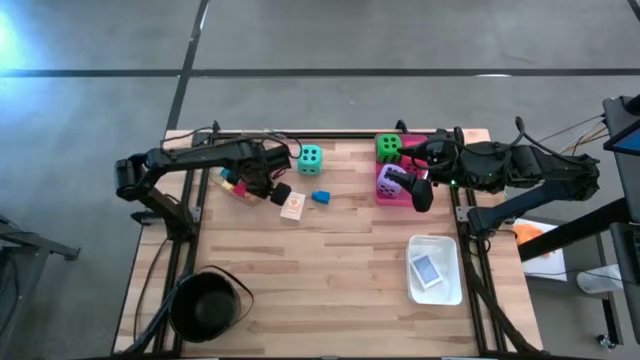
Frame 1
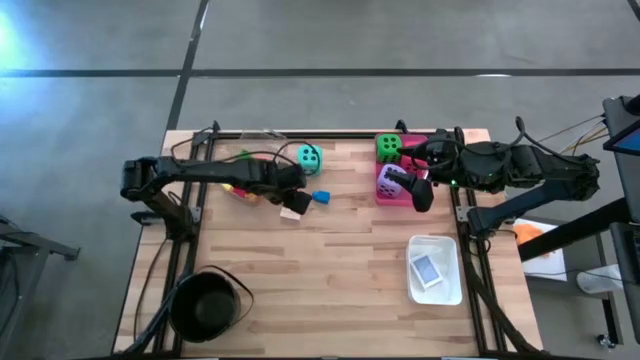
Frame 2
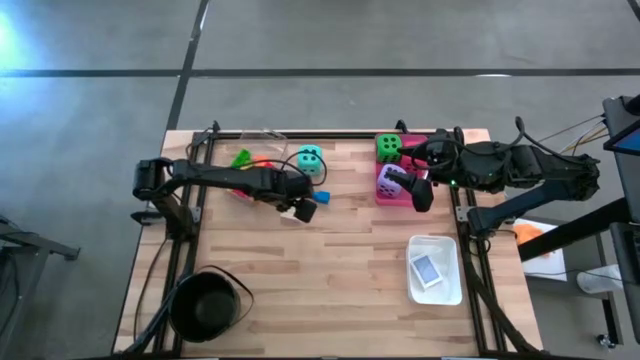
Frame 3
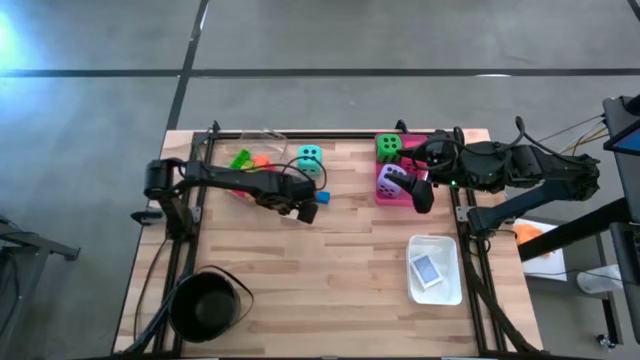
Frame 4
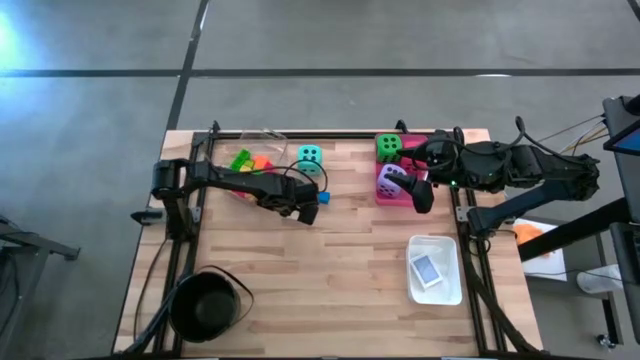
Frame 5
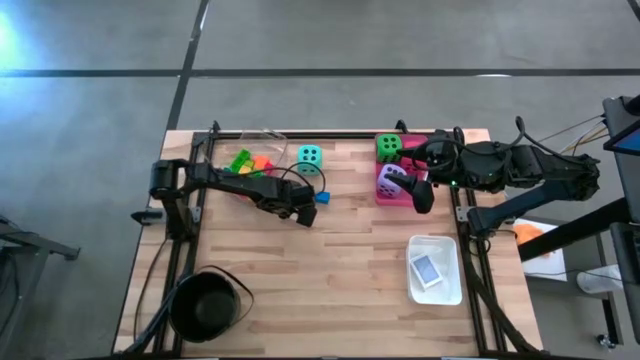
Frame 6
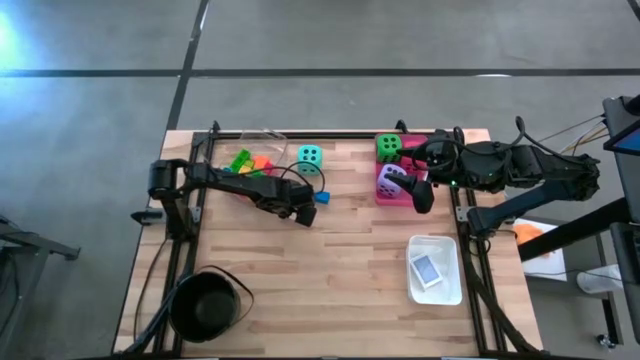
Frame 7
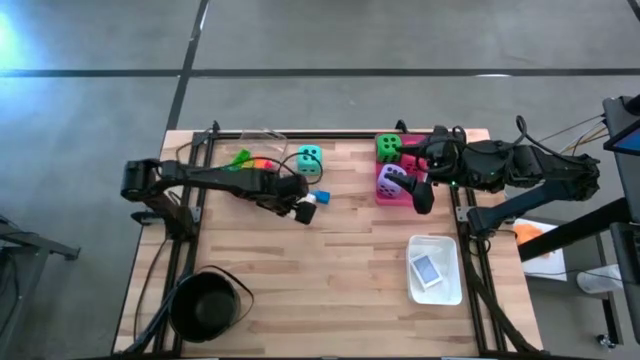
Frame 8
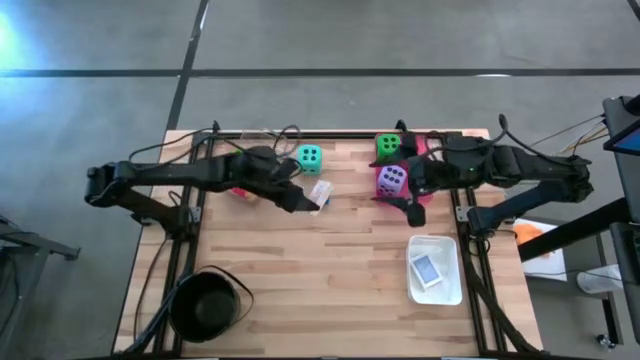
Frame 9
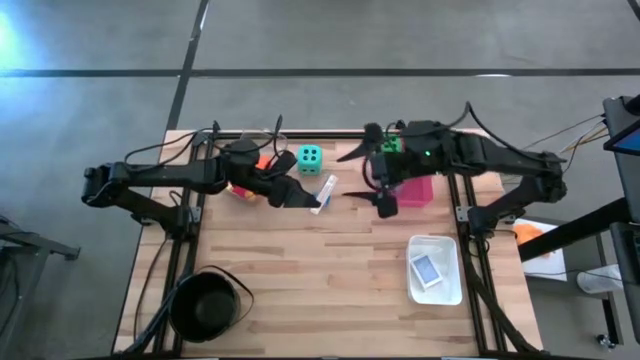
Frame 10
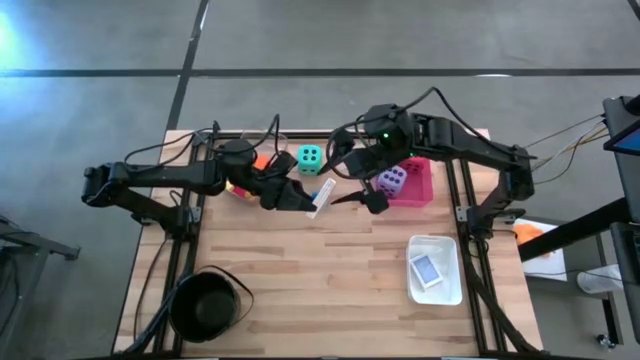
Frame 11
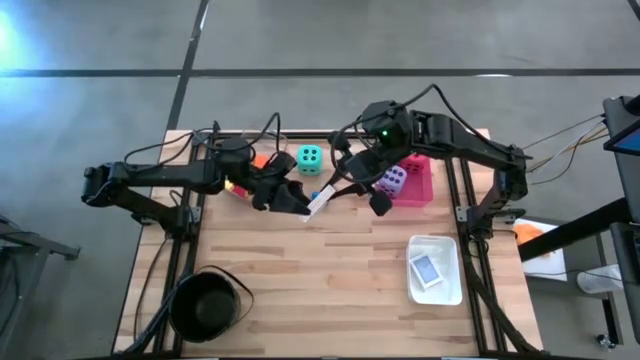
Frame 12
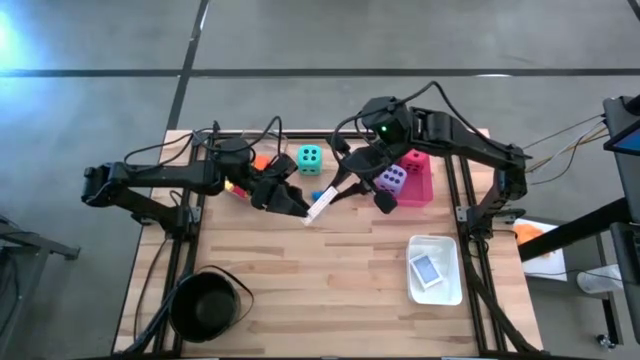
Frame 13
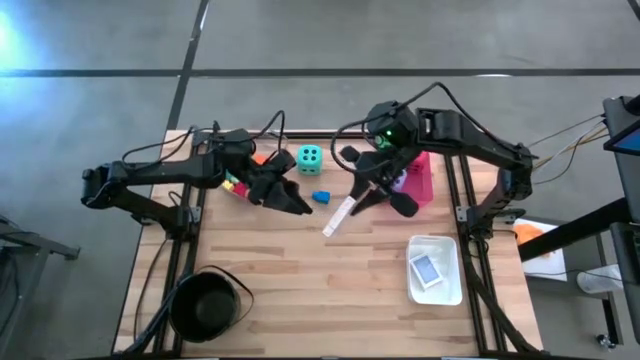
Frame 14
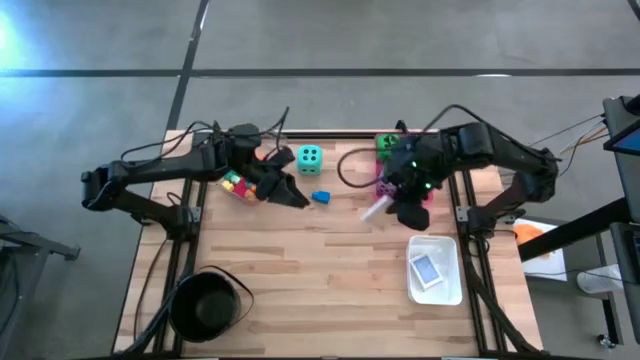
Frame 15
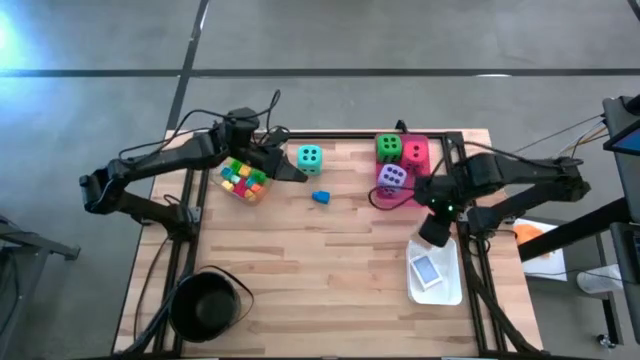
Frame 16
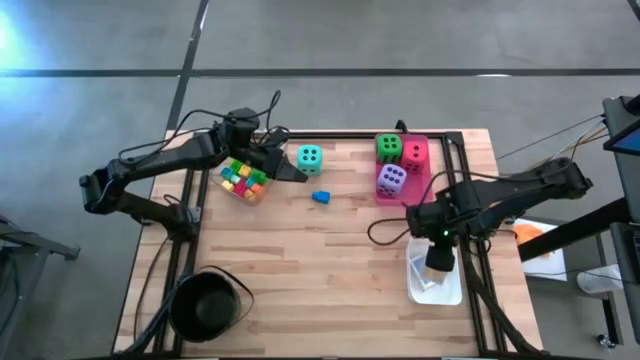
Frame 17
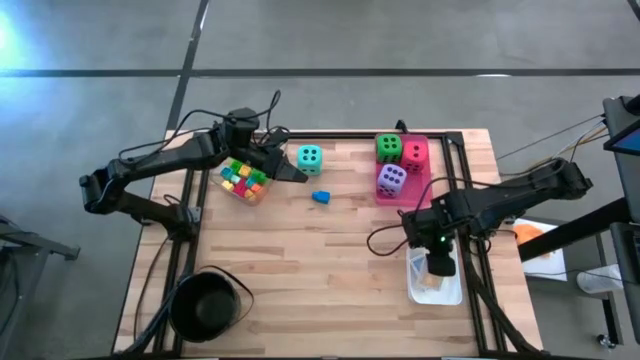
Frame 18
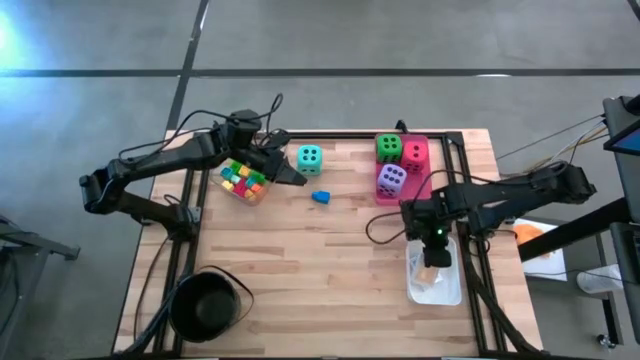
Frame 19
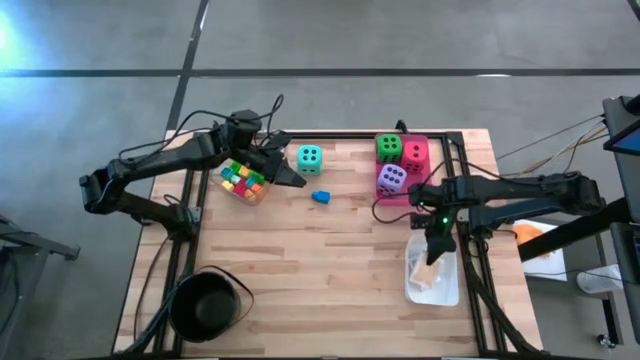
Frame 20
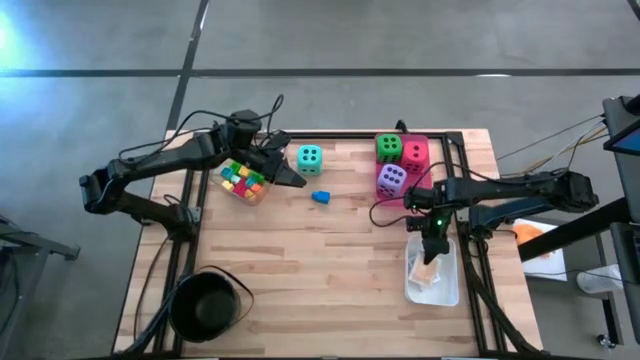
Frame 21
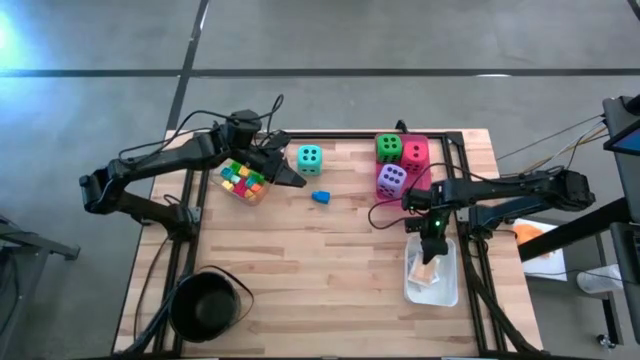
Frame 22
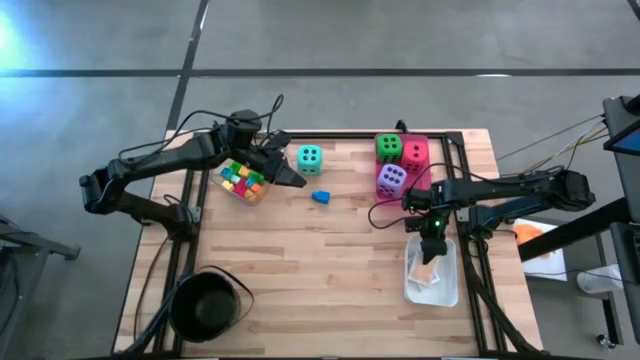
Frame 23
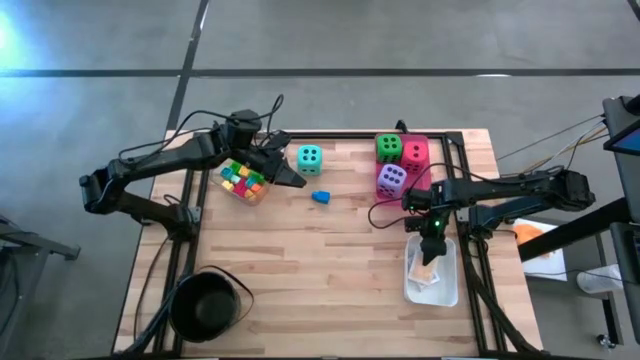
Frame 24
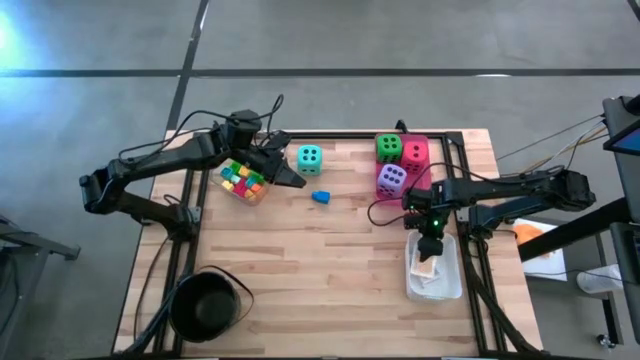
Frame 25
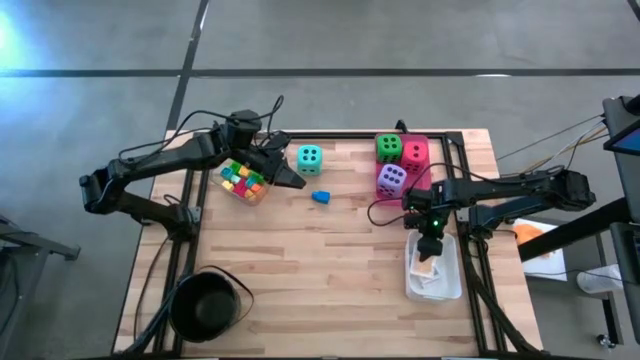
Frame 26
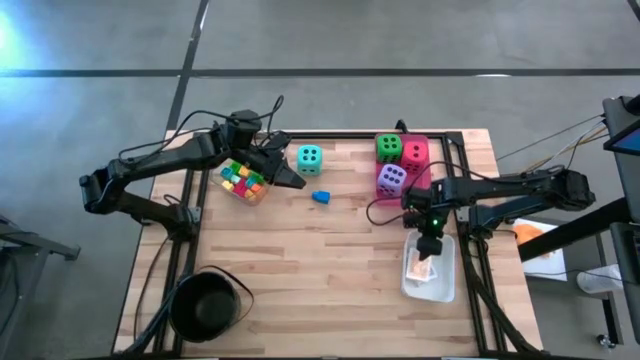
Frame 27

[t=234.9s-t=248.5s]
Task: Pick & Place Toys
Put the yellow deck of cards into the white bin

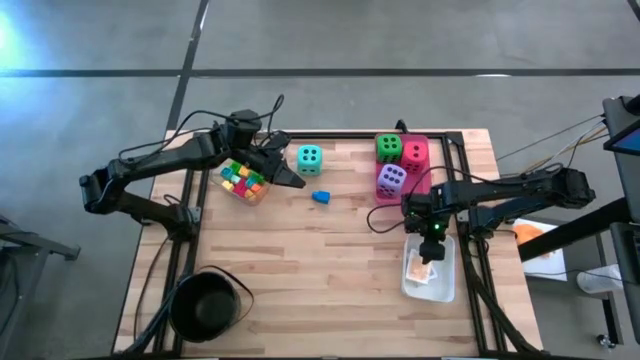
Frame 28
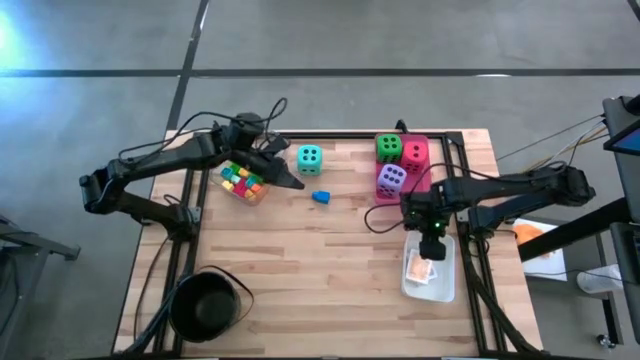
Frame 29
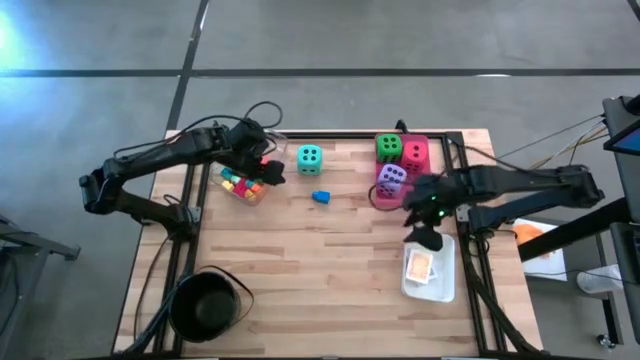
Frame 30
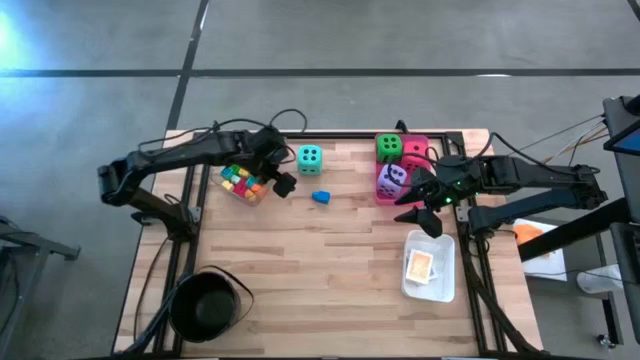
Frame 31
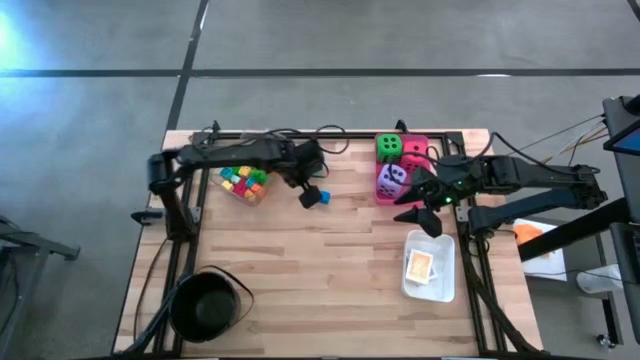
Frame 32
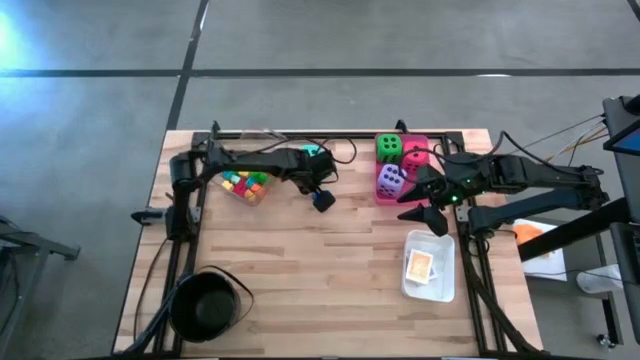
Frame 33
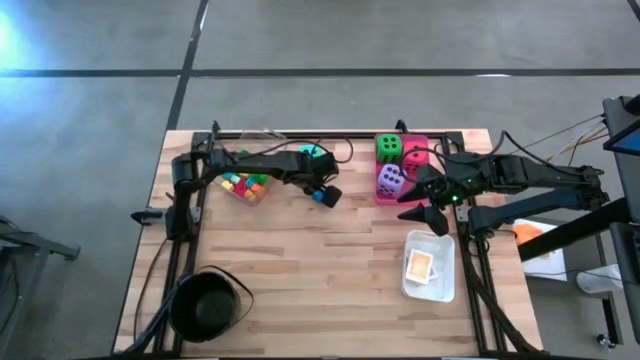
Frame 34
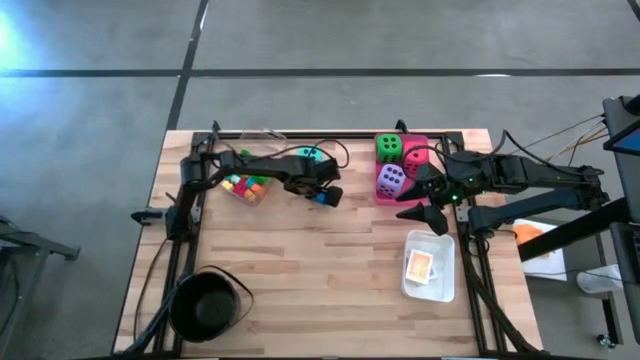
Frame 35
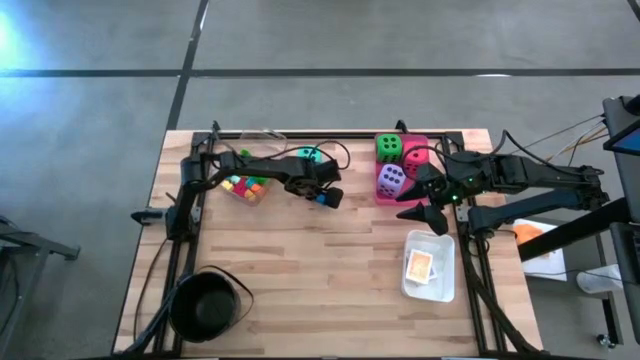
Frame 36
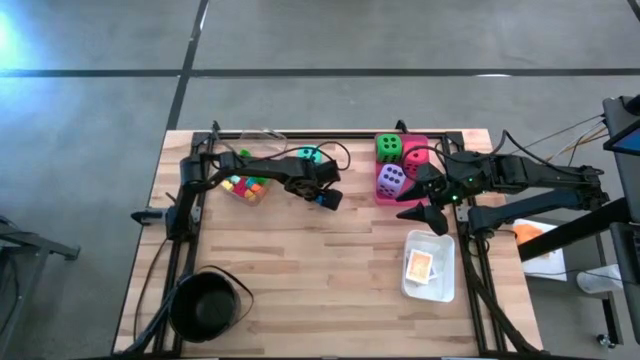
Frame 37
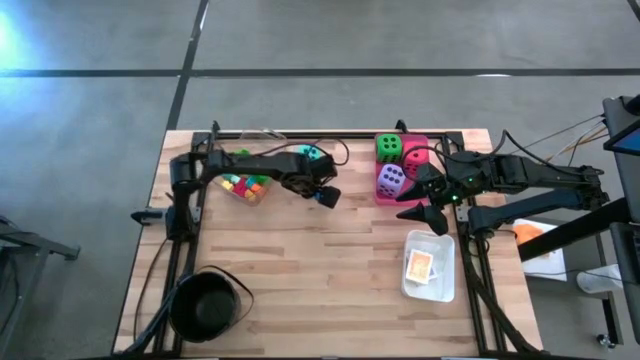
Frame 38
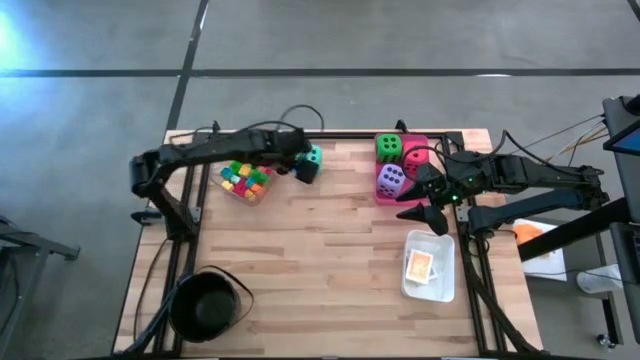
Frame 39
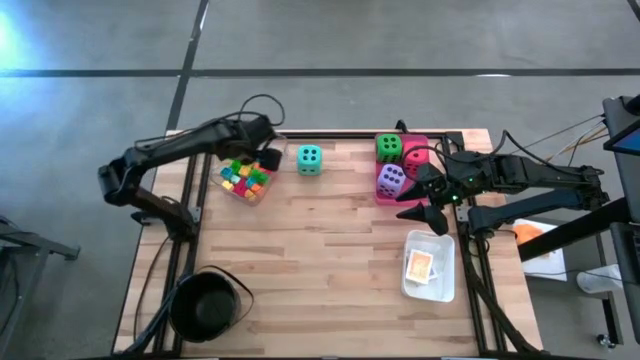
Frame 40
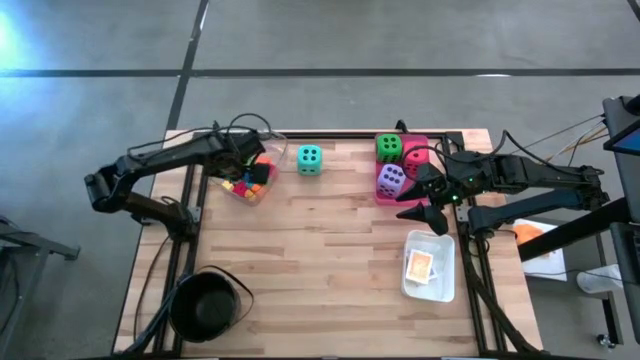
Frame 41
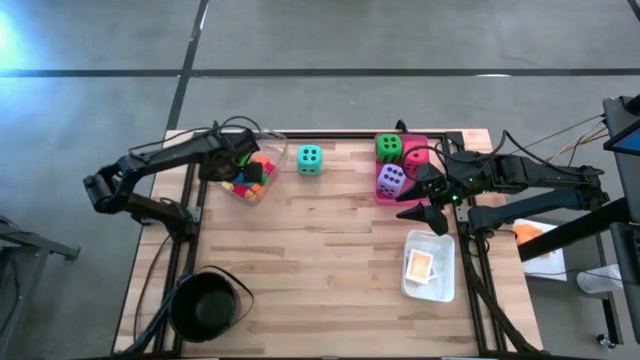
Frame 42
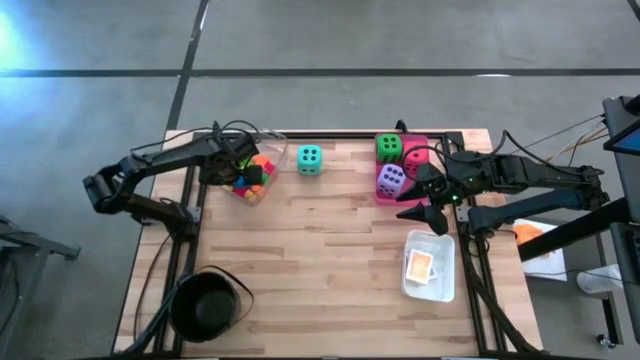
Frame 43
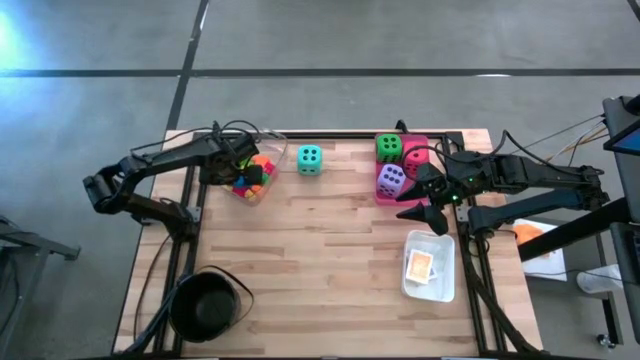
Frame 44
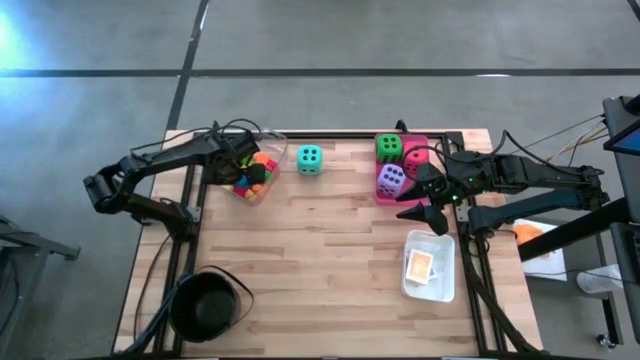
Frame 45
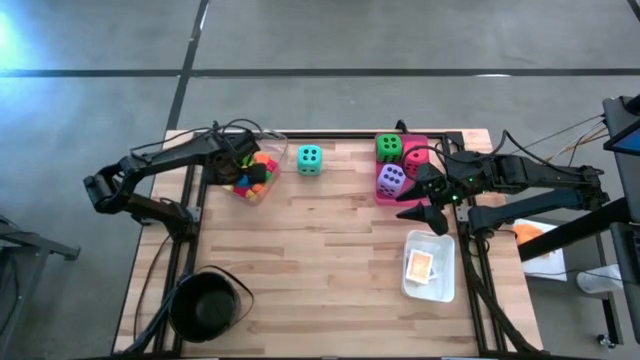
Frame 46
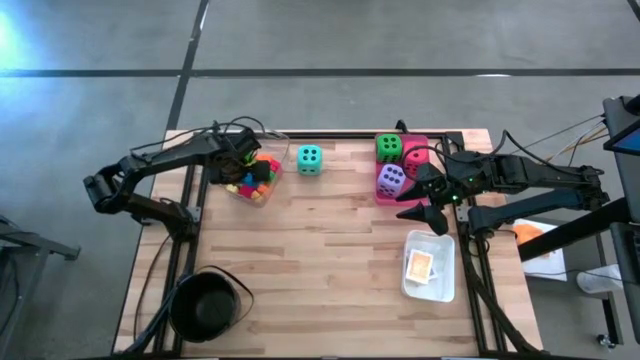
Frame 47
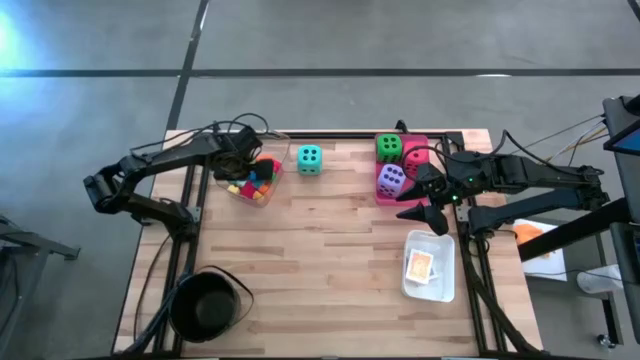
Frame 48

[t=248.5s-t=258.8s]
Put the blue game piece into the transparent bin
